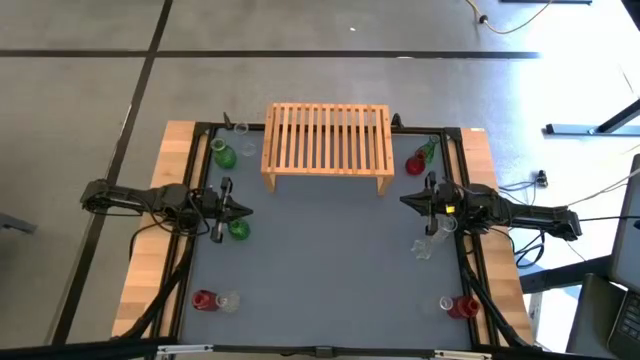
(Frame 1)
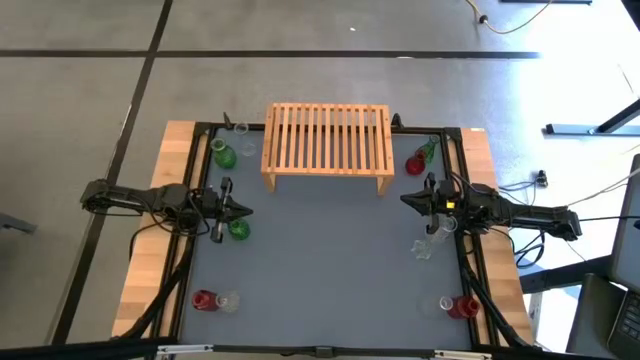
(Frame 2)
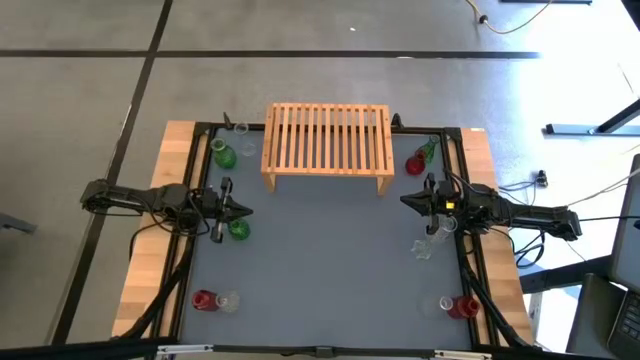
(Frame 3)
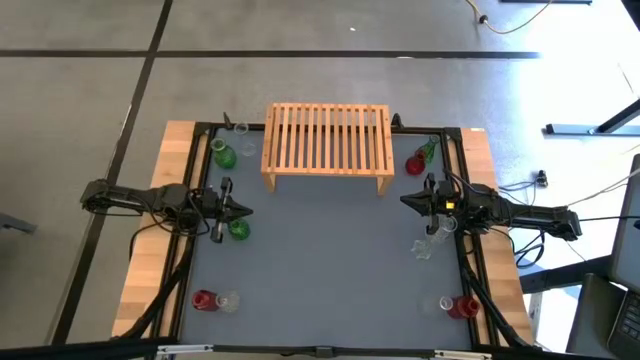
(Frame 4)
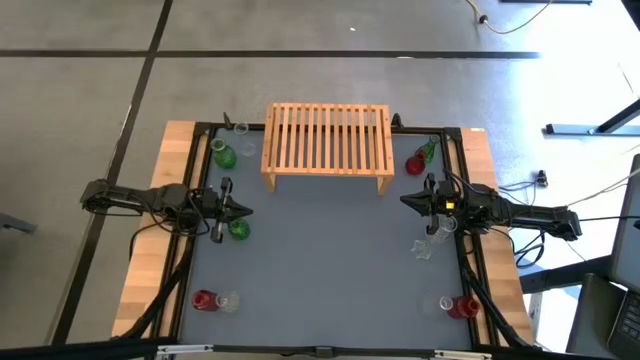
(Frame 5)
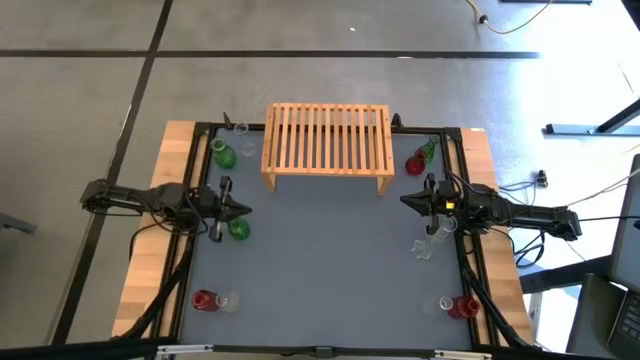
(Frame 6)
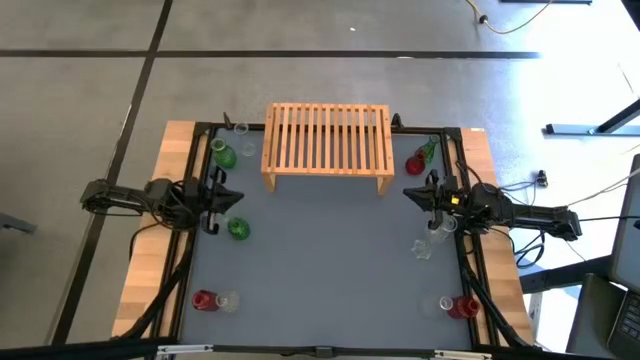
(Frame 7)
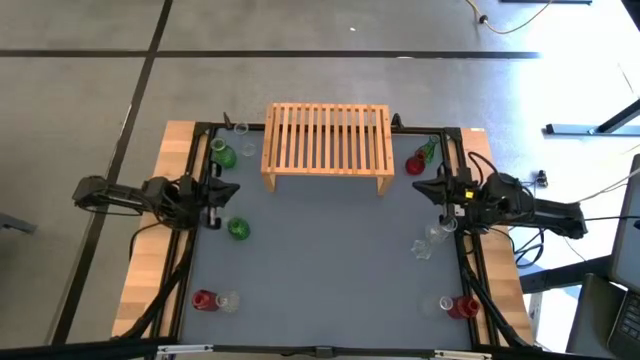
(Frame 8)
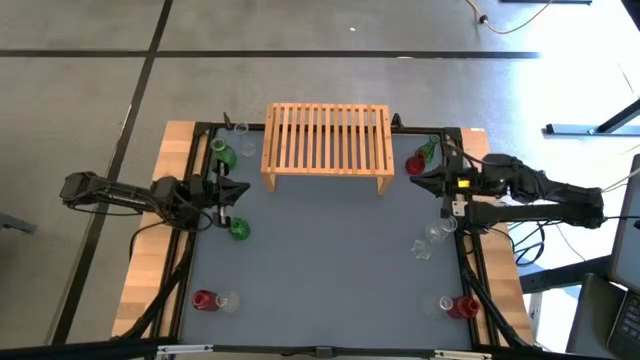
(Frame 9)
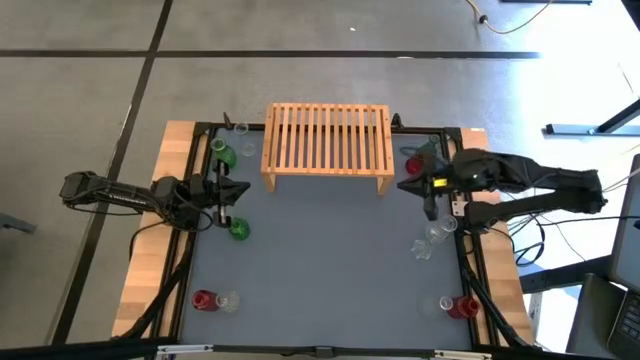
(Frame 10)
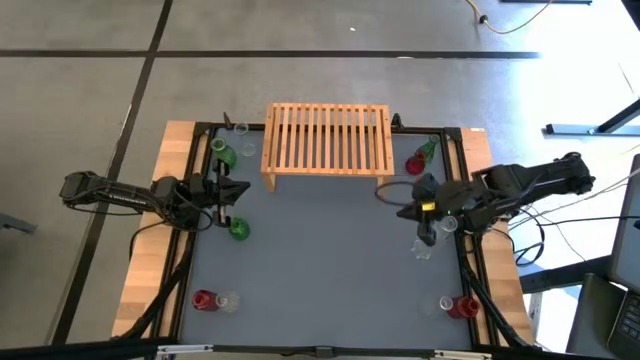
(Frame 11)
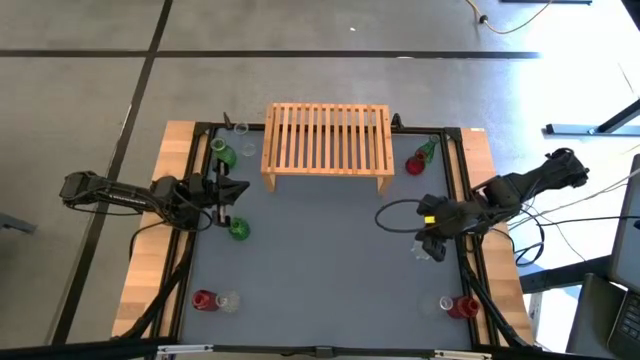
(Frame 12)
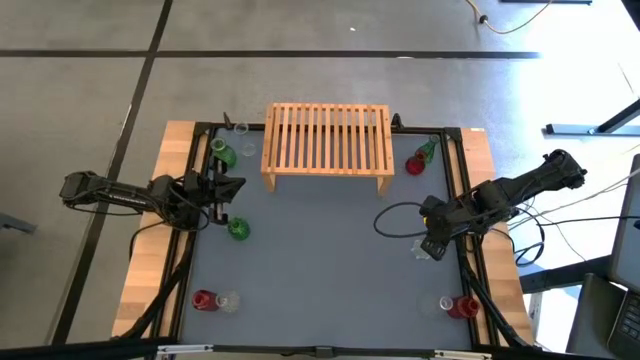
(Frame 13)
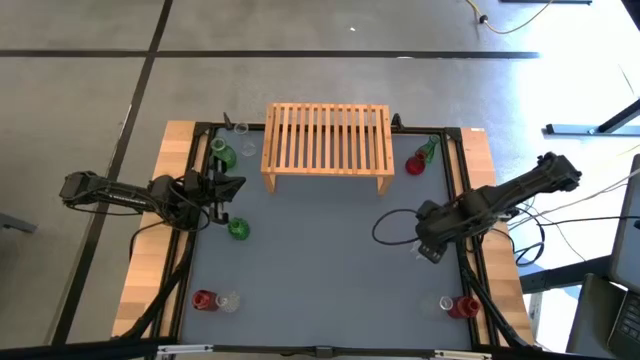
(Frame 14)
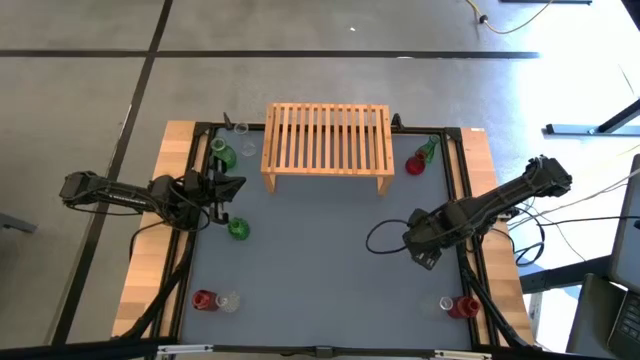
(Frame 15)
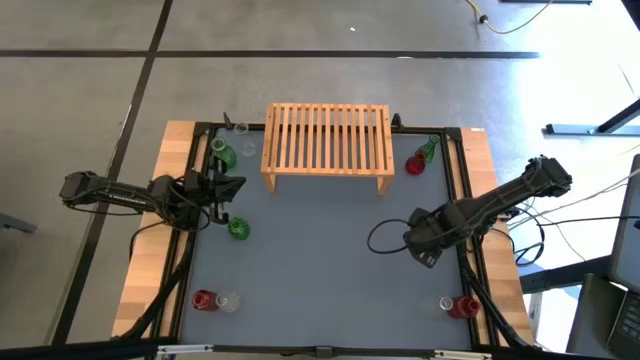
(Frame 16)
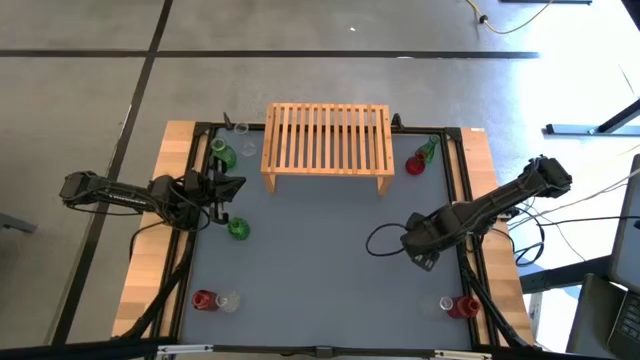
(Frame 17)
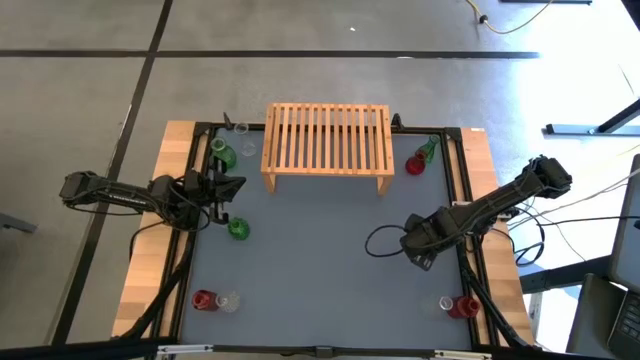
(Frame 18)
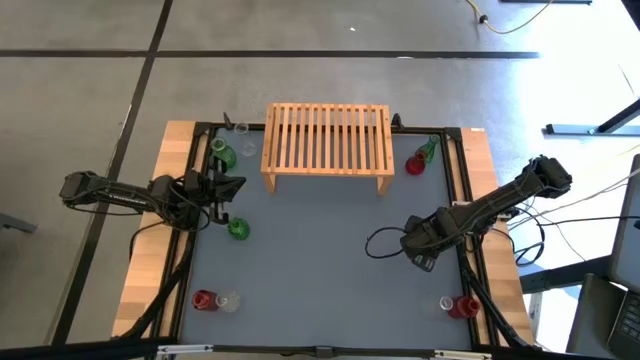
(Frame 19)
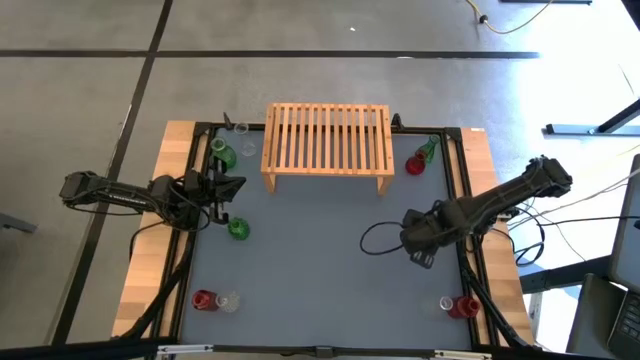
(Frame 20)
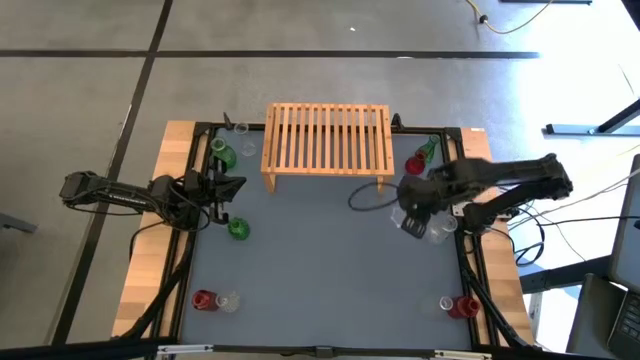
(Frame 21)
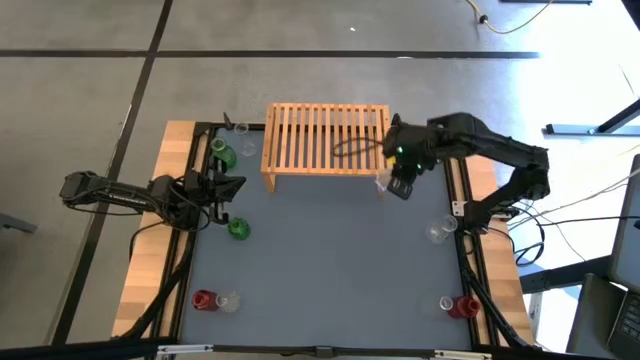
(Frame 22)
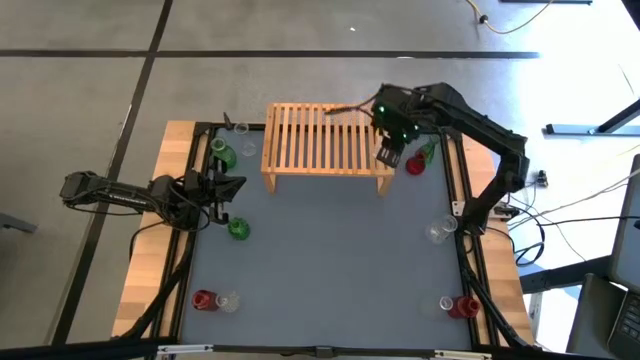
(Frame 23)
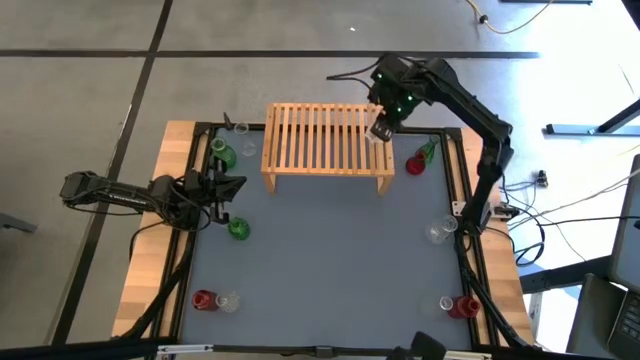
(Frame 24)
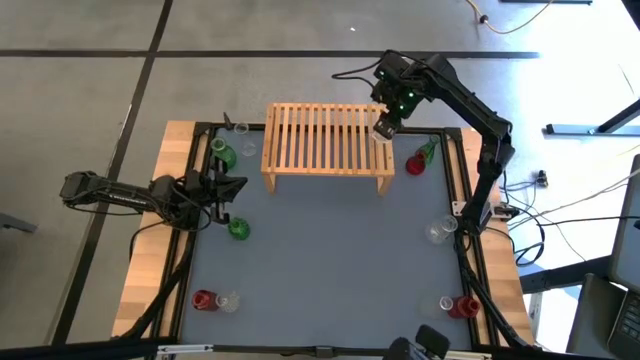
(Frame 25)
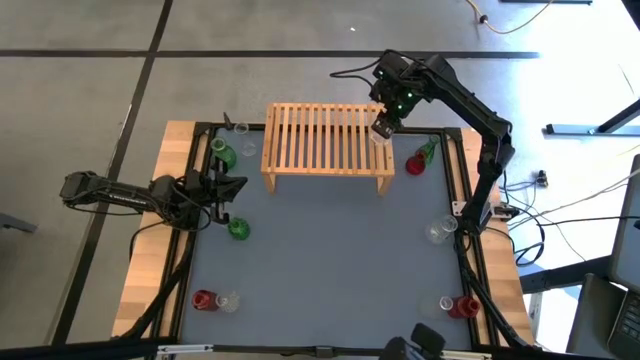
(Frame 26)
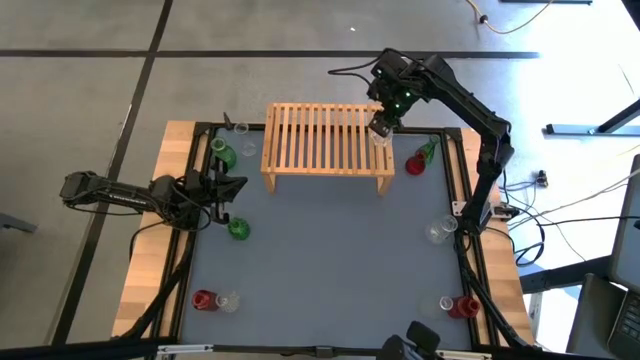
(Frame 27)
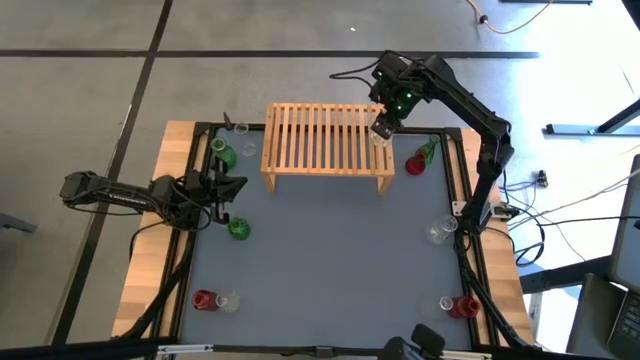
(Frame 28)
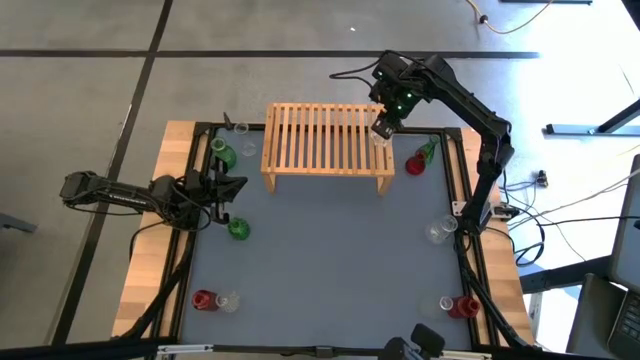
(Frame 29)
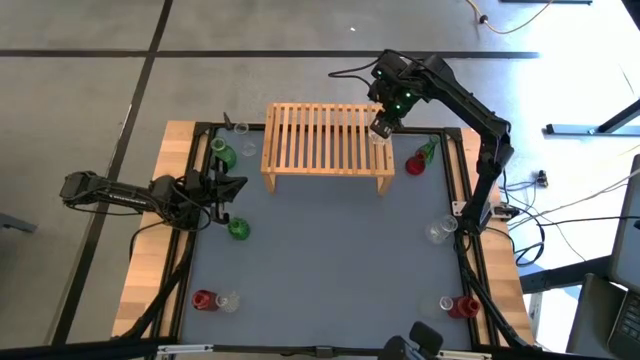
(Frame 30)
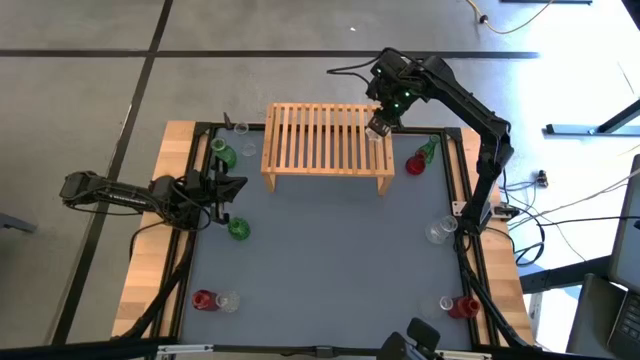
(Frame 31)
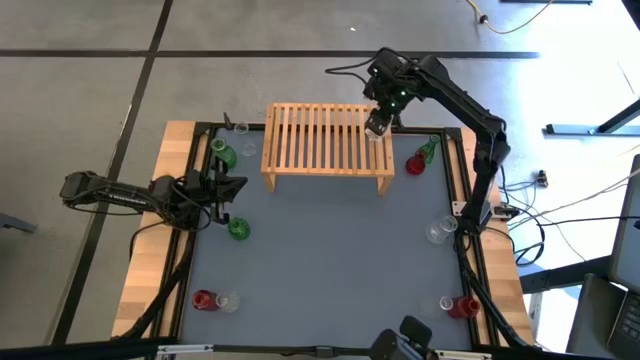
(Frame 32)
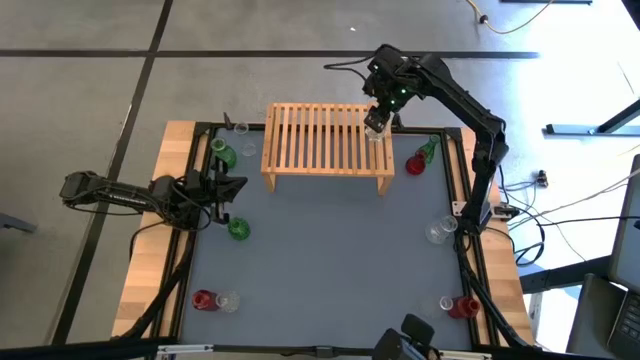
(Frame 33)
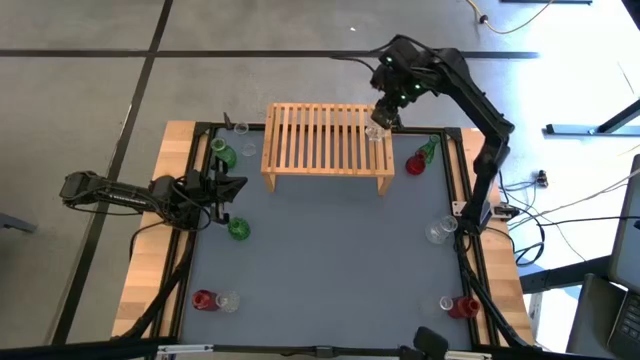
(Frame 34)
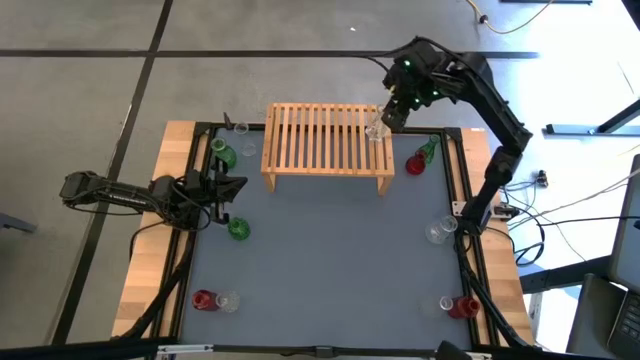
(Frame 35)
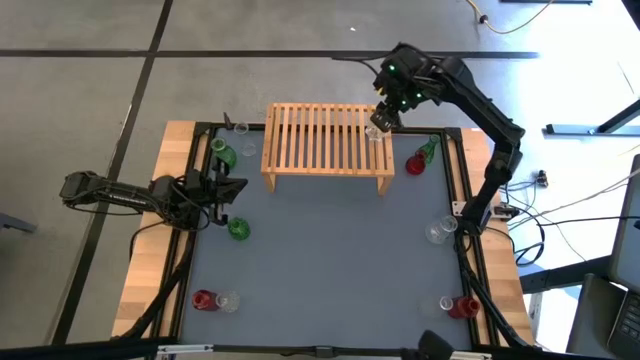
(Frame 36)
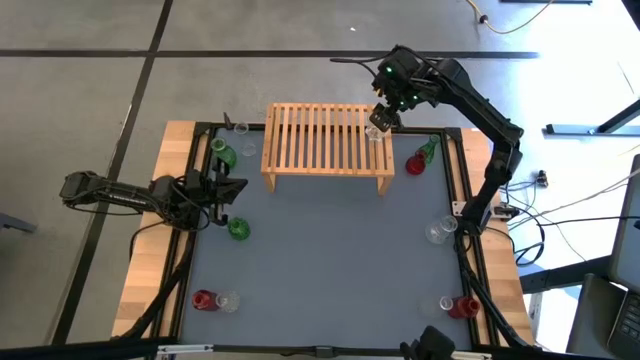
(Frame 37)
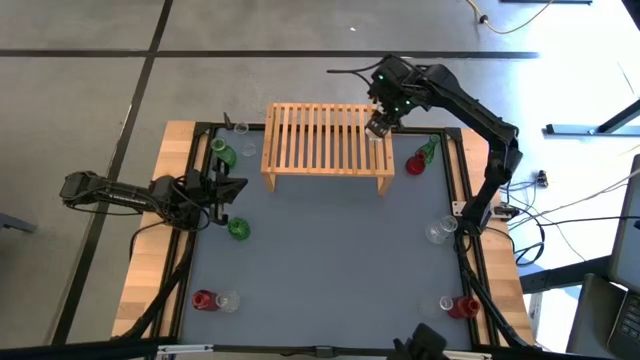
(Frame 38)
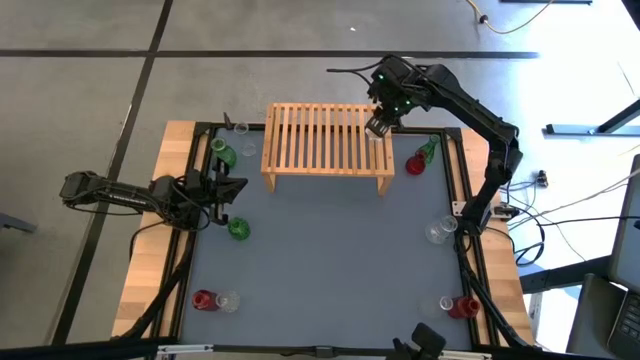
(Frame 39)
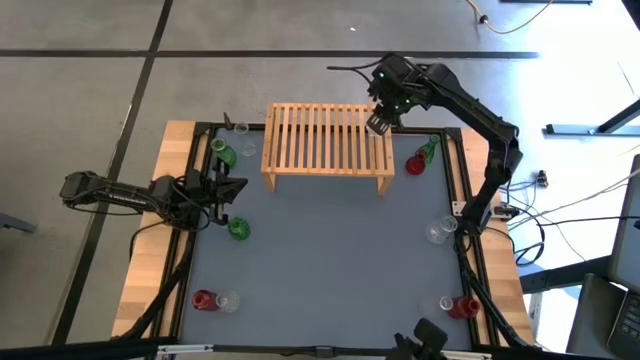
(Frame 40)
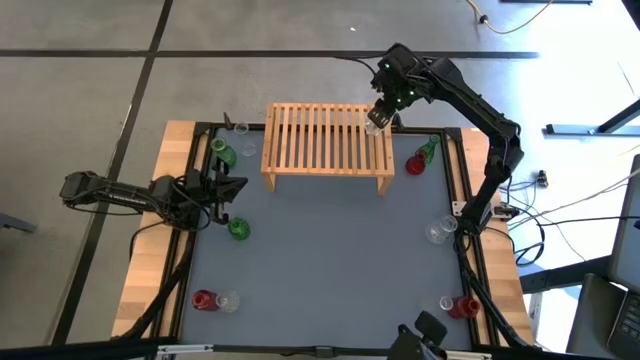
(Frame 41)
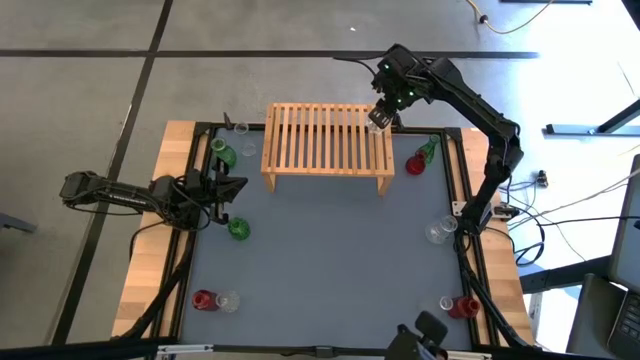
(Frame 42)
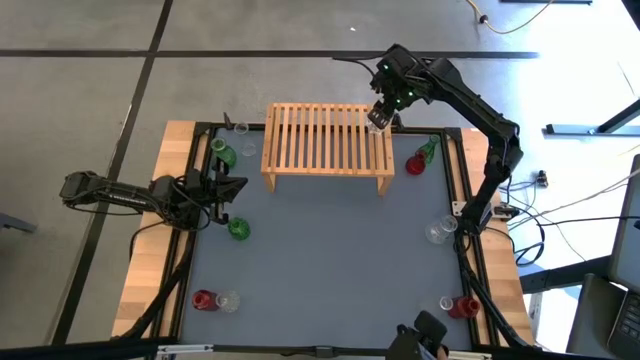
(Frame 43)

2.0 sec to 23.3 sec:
Task: sort vases onto shelf
Put the transparent vase on the shelf
